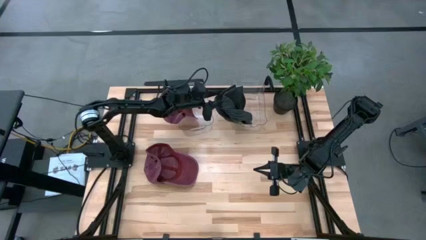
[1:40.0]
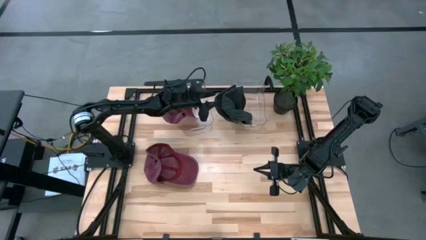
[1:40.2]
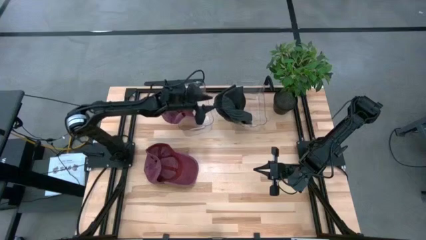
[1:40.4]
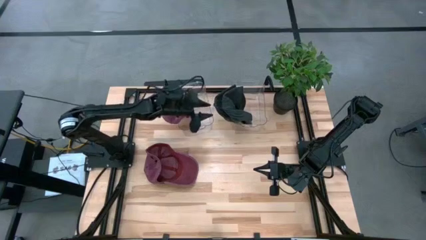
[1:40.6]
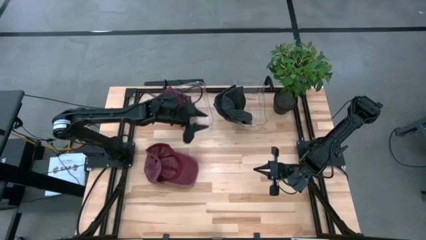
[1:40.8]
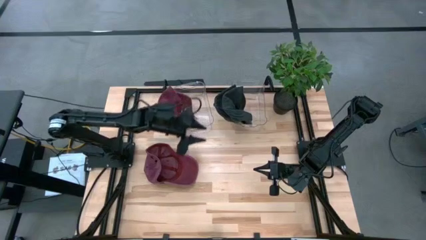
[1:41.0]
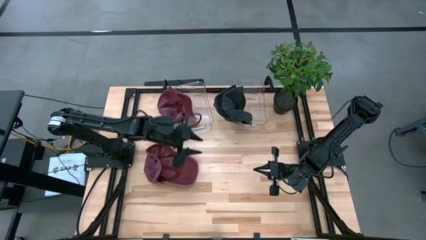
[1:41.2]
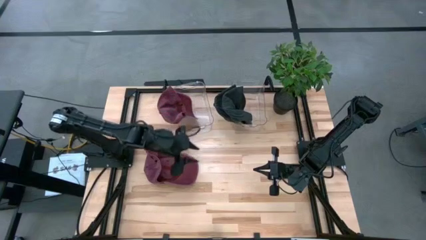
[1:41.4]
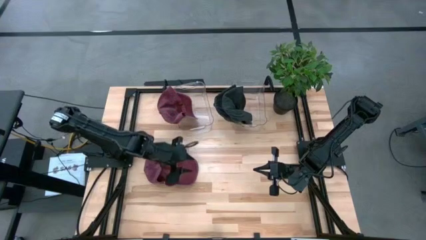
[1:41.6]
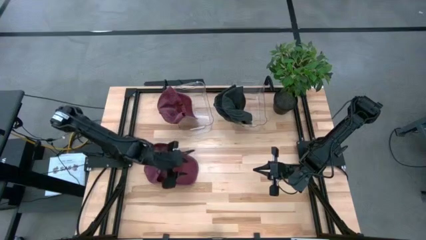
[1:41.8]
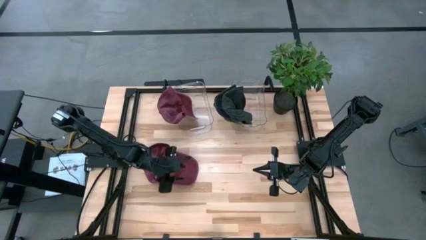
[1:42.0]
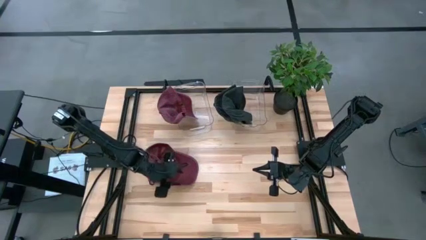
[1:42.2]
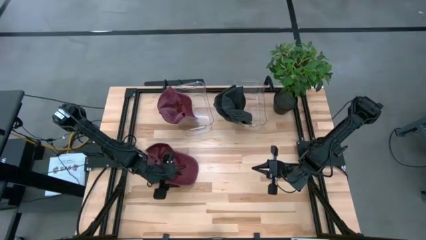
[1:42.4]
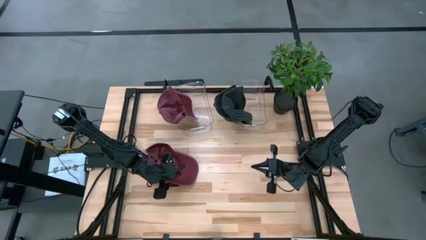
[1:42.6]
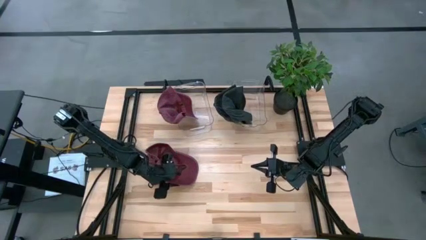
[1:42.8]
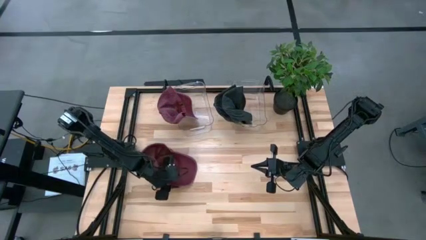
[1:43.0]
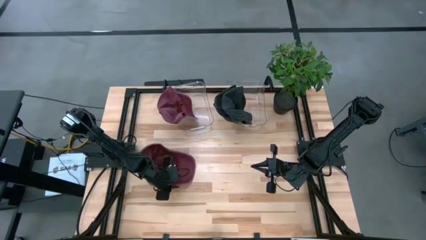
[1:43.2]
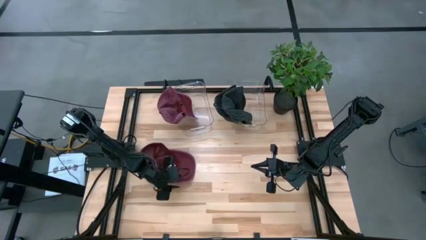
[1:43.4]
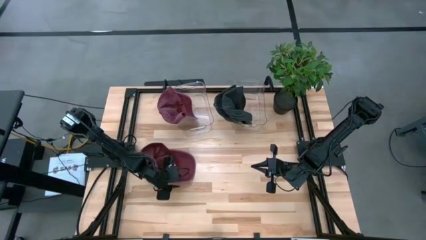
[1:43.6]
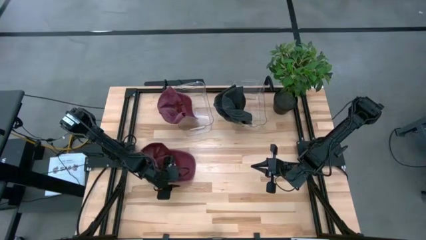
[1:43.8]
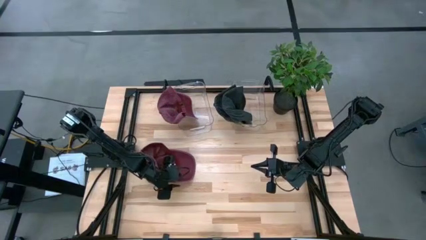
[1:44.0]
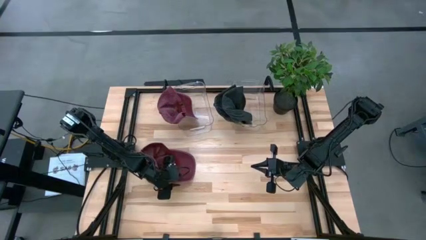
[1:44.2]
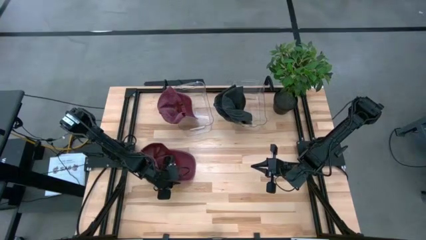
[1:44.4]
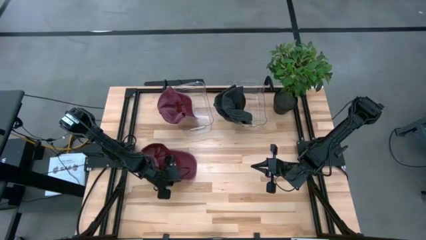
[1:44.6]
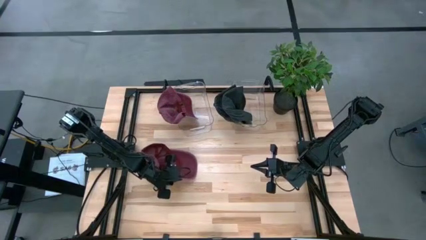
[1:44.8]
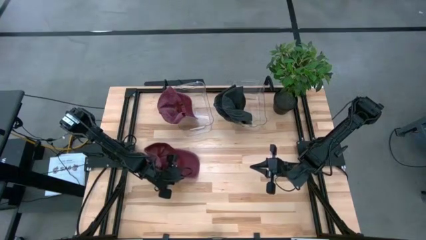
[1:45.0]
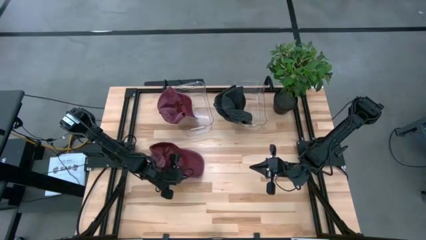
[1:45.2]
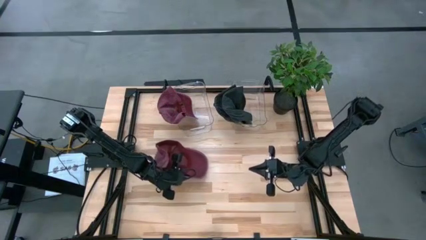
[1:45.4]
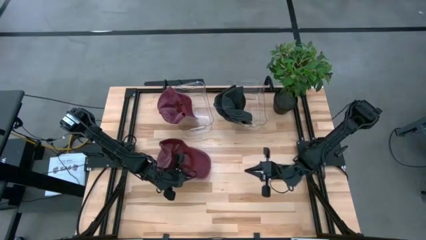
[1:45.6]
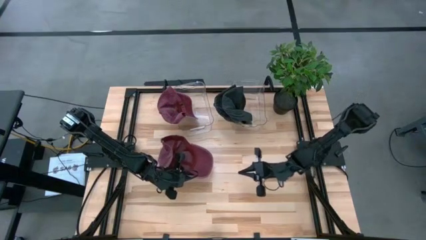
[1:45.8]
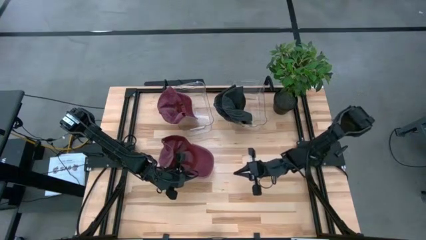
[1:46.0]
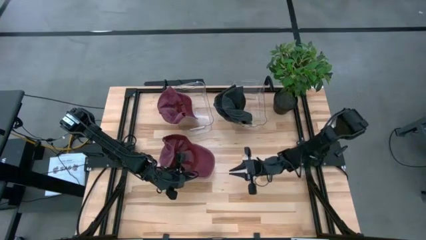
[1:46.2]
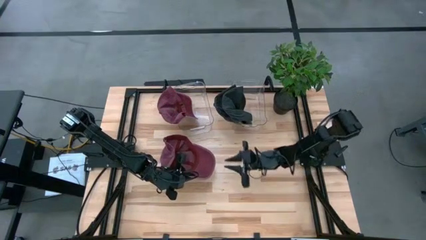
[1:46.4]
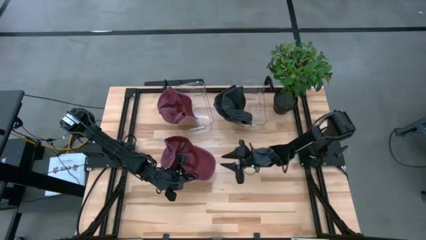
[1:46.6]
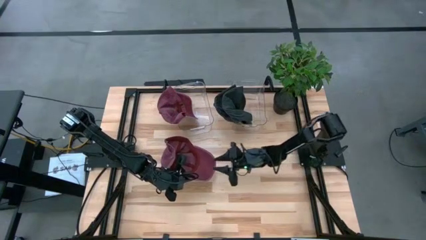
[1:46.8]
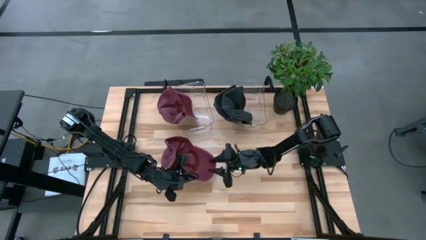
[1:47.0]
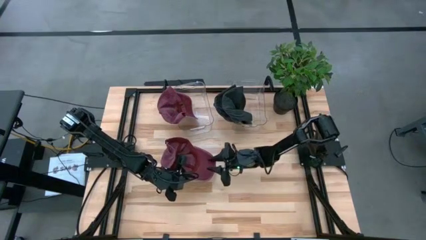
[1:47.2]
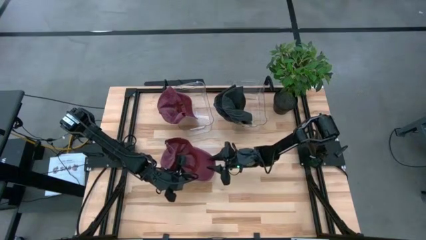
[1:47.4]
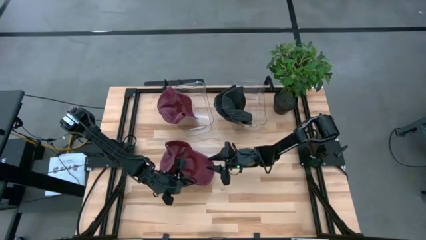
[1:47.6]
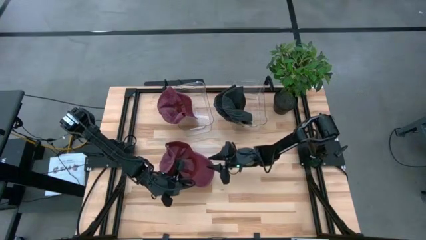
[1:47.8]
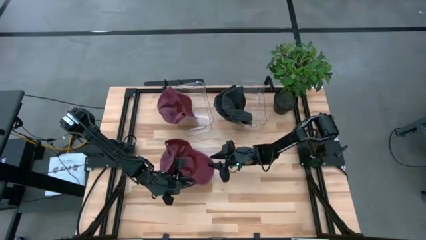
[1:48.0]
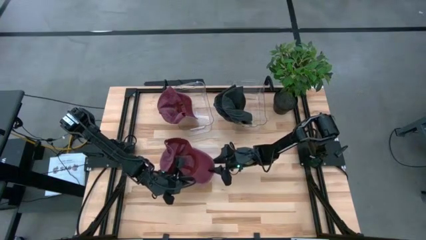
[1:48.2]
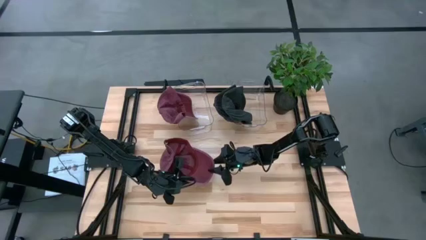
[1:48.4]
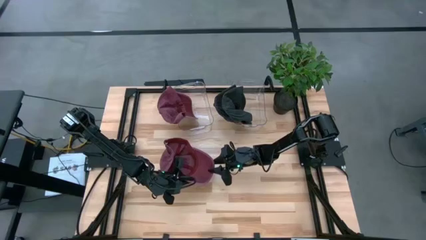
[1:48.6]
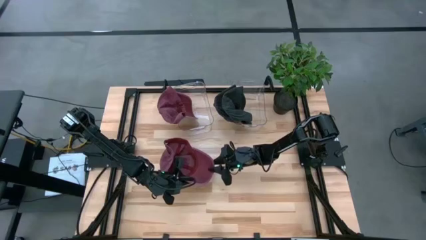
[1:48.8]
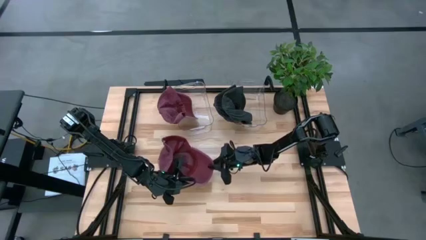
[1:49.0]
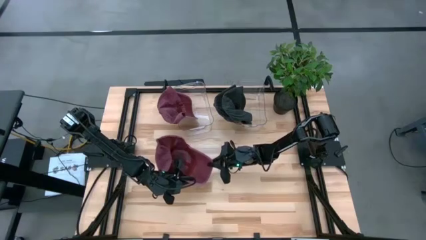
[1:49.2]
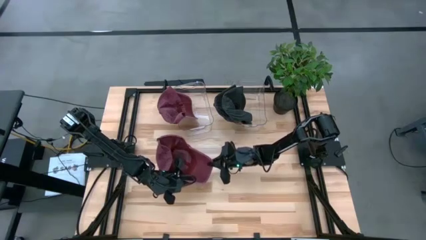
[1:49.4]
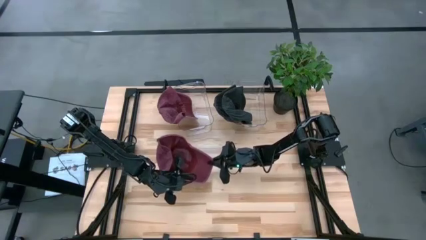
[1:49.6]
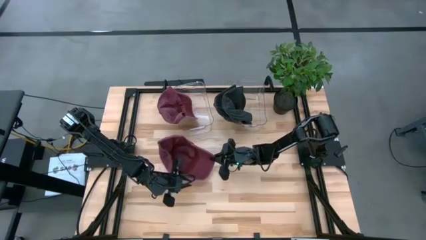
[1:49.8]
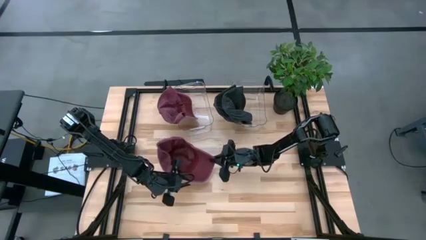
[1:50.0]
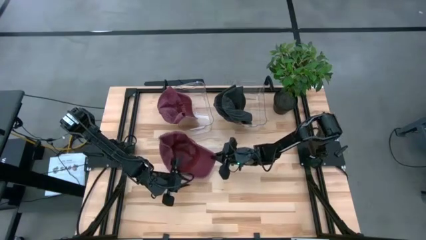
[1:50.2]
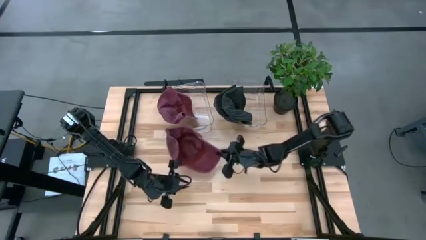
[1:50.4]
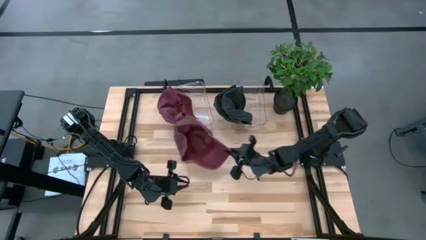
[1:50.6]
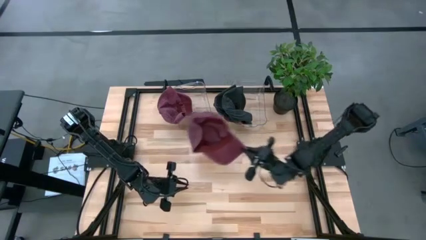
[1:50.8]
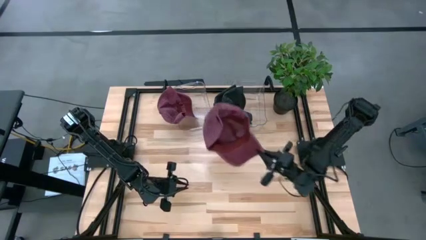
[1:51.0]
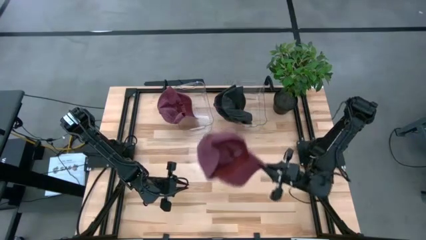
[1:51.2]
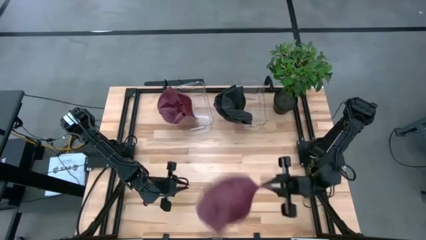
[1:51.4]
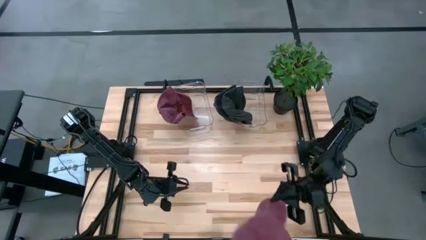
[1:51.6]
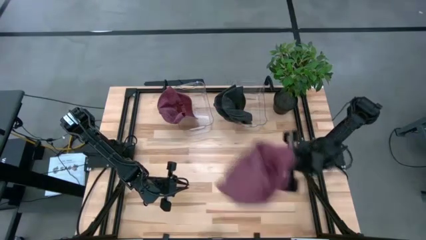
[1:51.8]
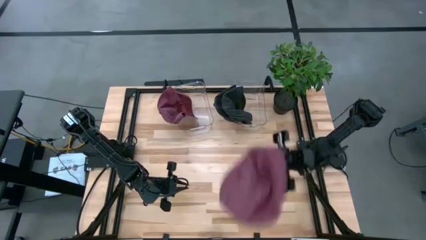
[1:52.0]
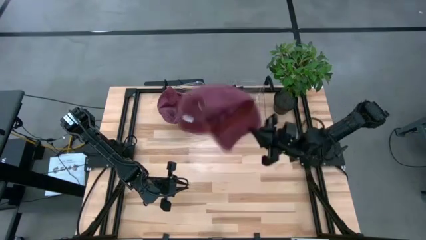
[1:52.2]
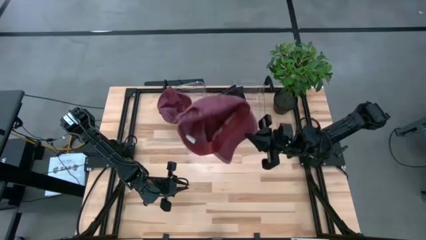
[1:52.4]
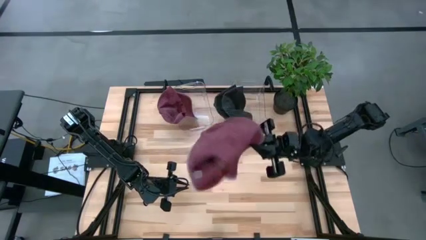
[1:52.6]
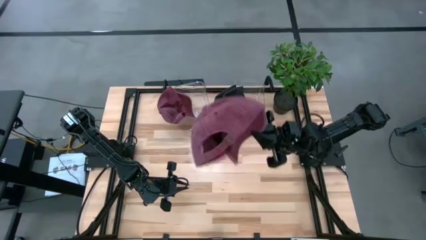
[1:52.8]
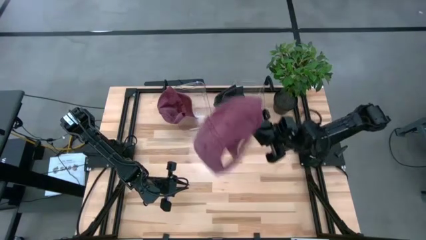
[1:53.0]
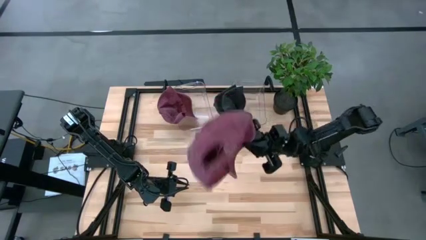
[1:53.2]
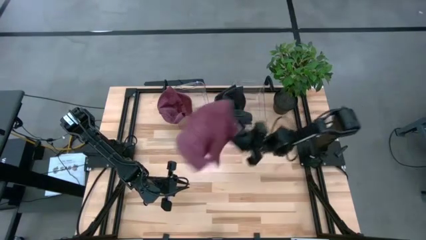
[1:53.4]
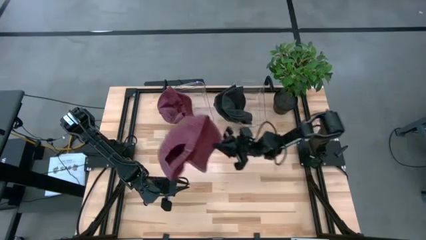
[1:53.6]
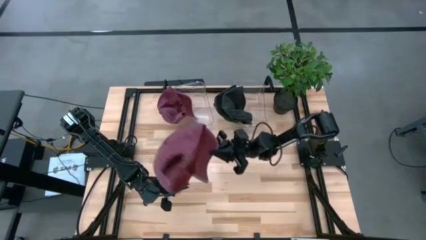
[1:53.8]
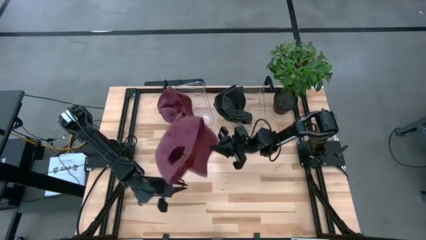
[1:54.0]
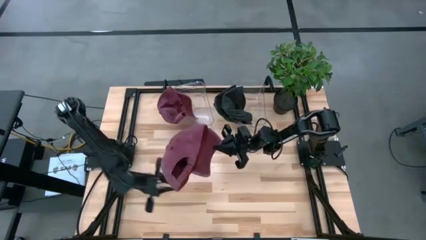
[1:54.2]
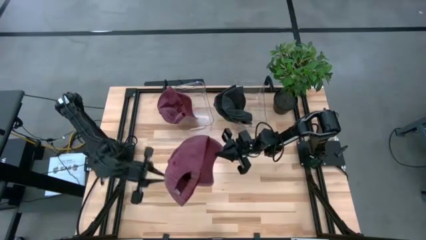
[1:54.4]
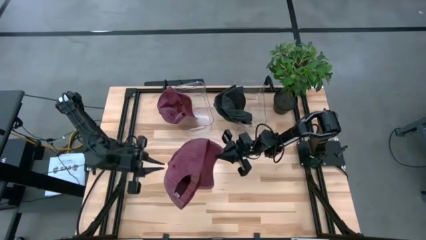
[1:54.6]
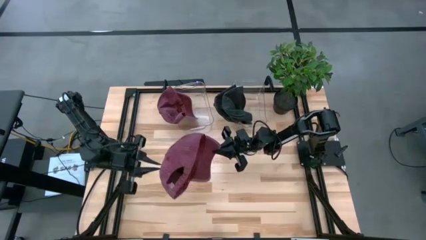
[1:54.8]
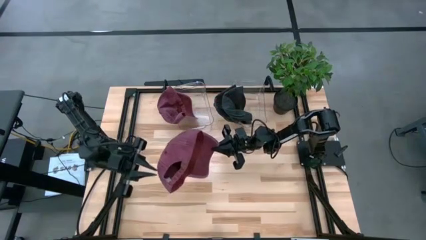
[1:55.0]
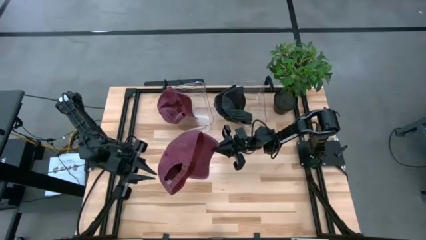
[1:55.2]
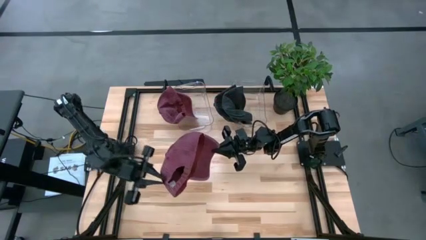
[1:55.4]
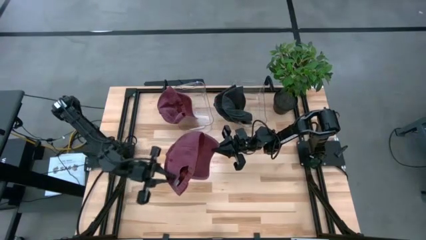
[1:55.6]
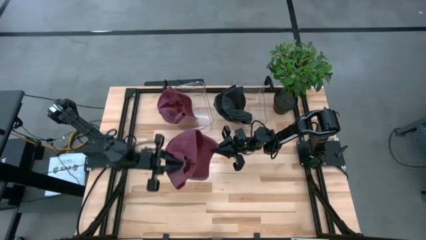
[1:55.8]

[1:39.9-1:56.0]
Task: Pick & Place hat
Put the red cap in the left transparent bin
